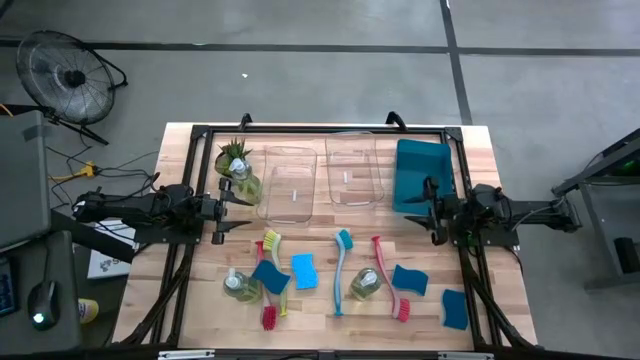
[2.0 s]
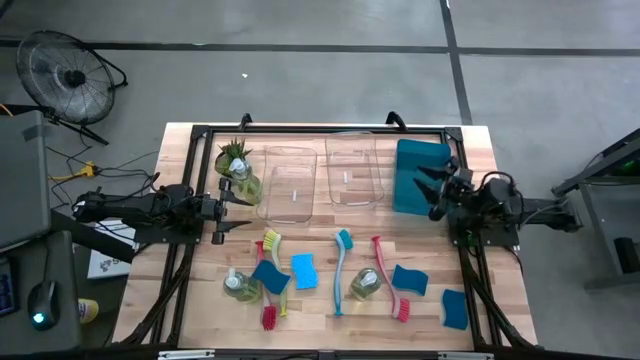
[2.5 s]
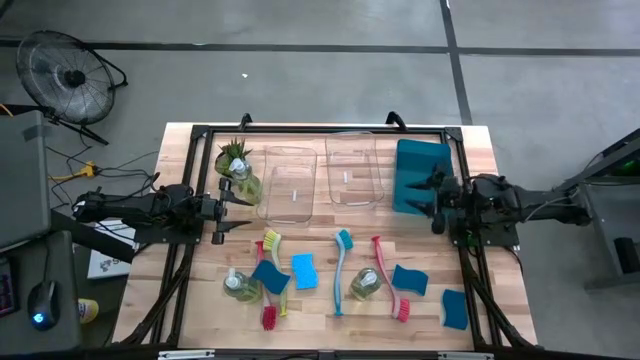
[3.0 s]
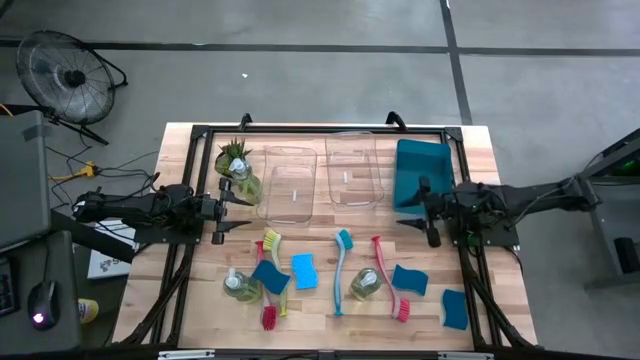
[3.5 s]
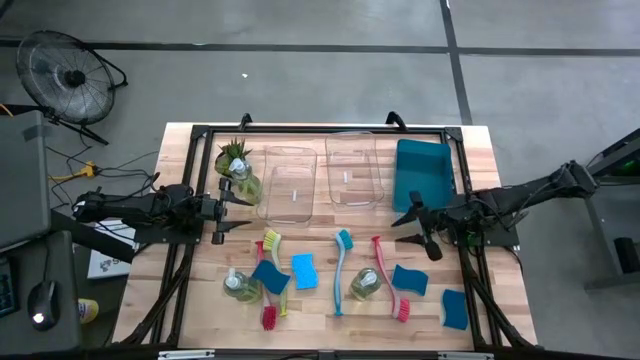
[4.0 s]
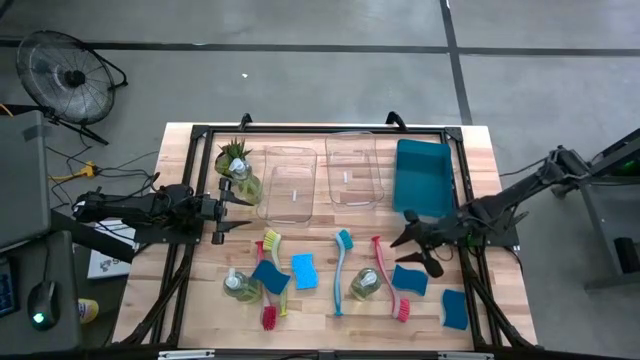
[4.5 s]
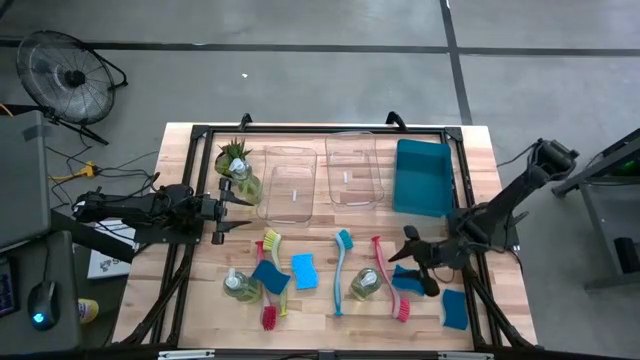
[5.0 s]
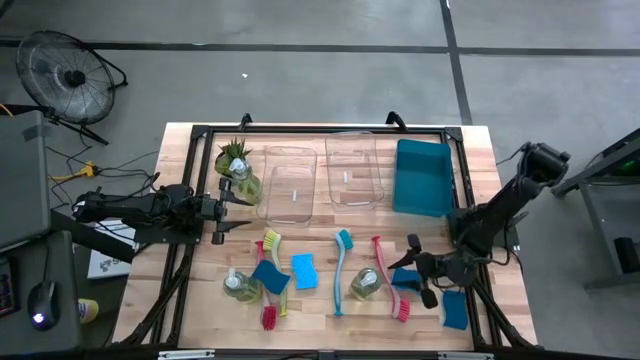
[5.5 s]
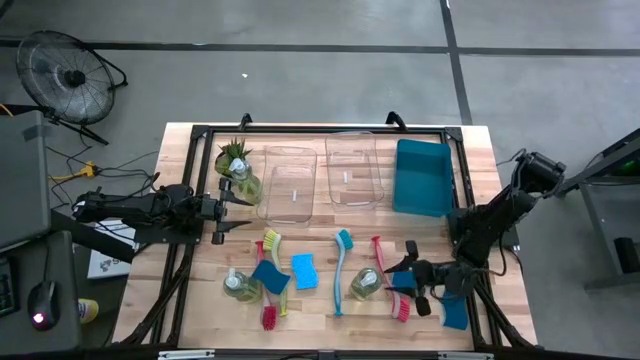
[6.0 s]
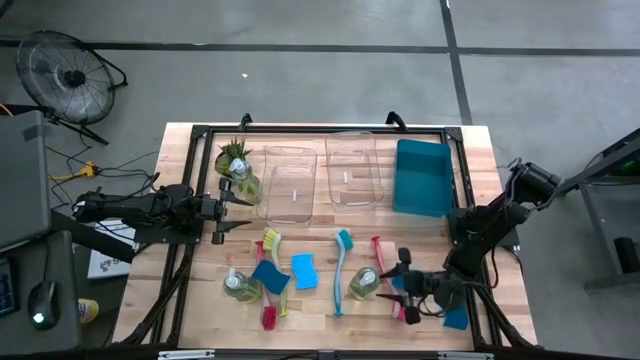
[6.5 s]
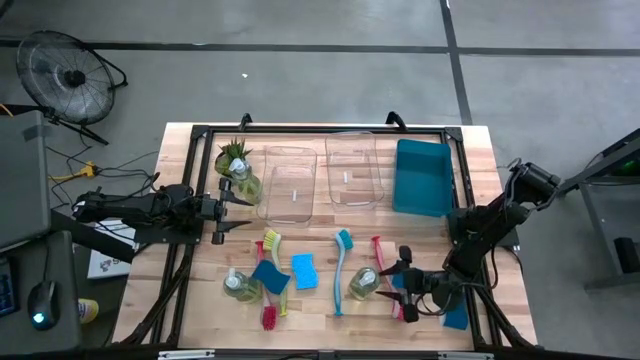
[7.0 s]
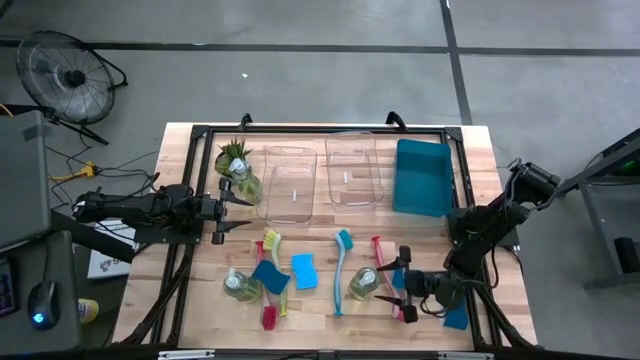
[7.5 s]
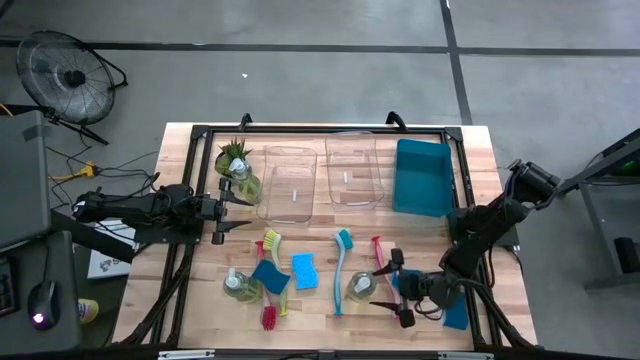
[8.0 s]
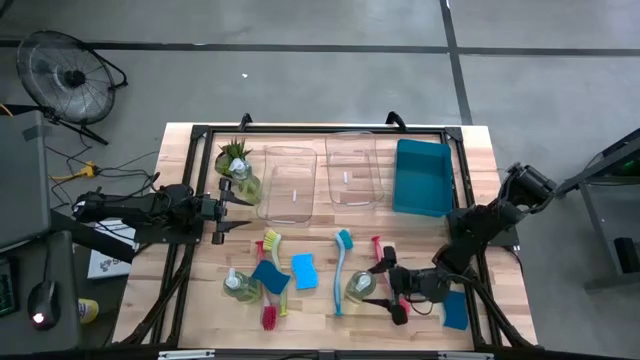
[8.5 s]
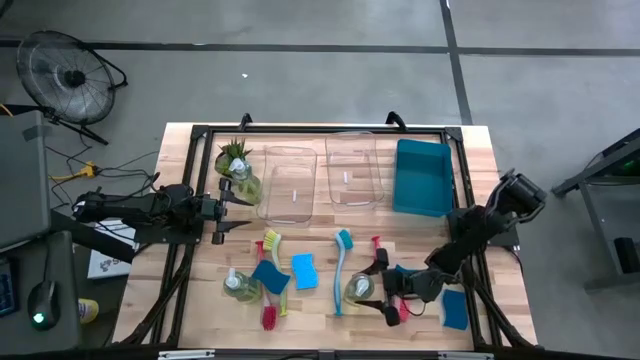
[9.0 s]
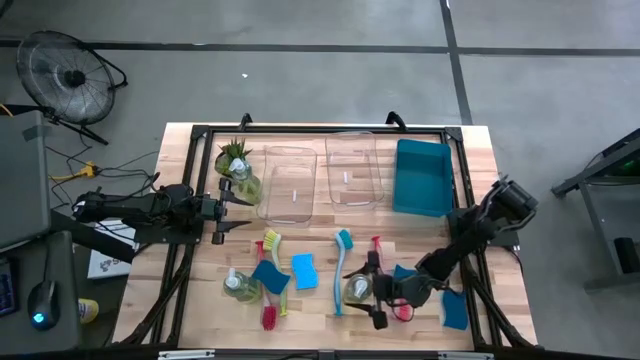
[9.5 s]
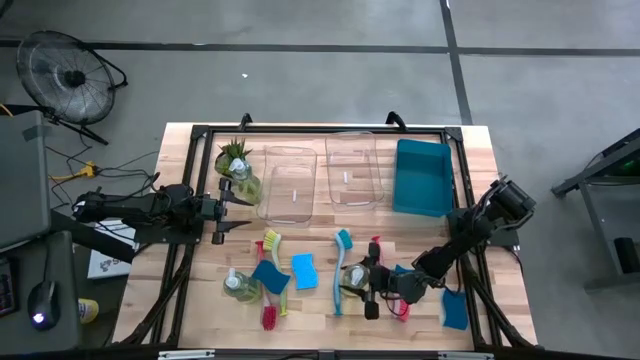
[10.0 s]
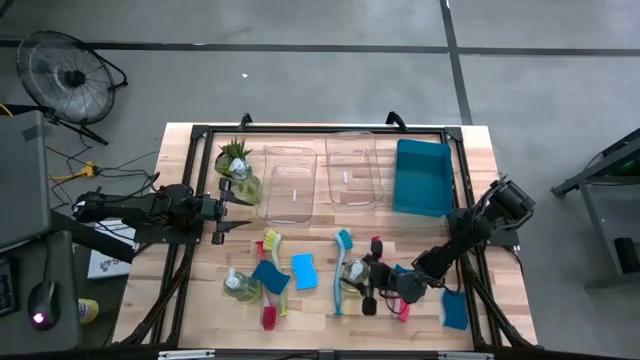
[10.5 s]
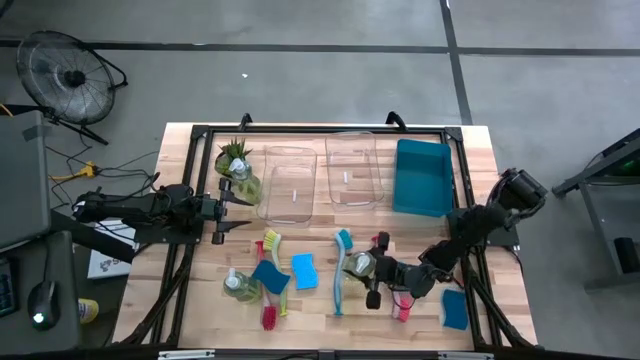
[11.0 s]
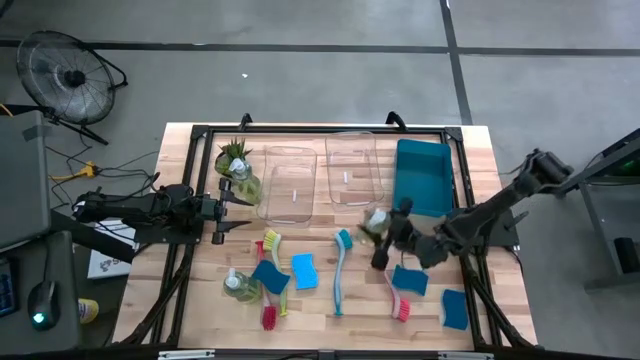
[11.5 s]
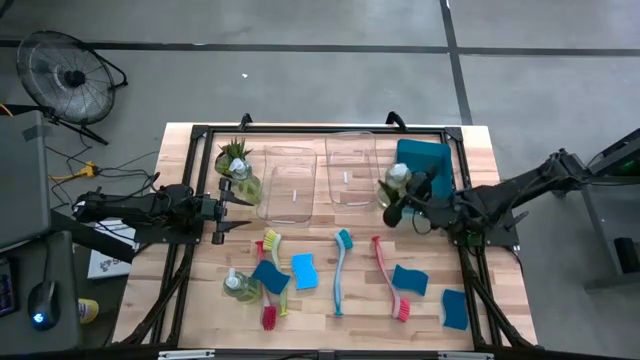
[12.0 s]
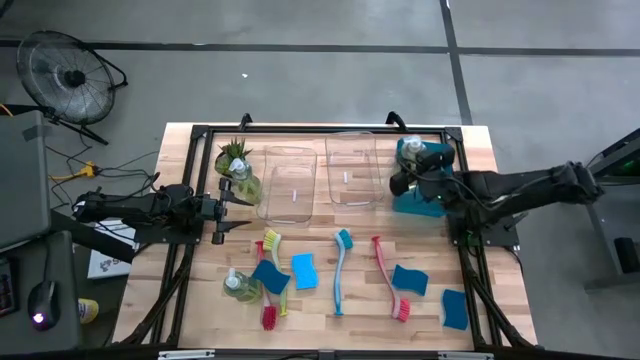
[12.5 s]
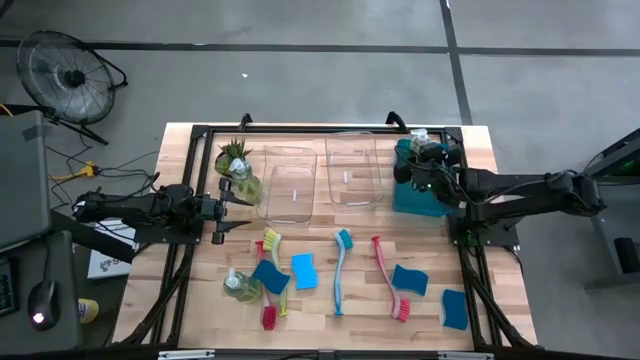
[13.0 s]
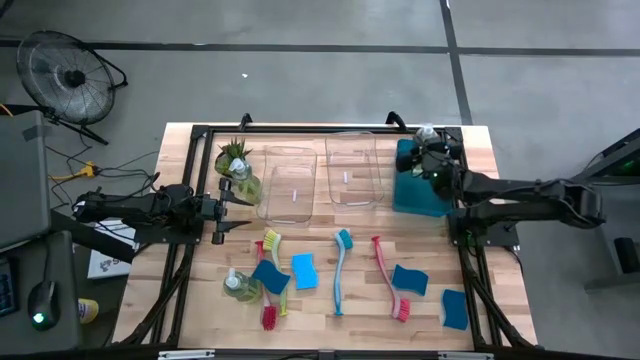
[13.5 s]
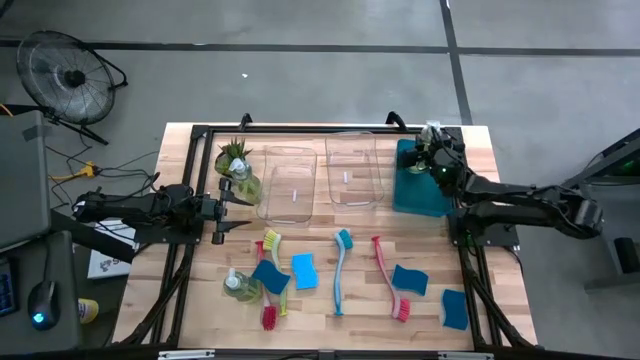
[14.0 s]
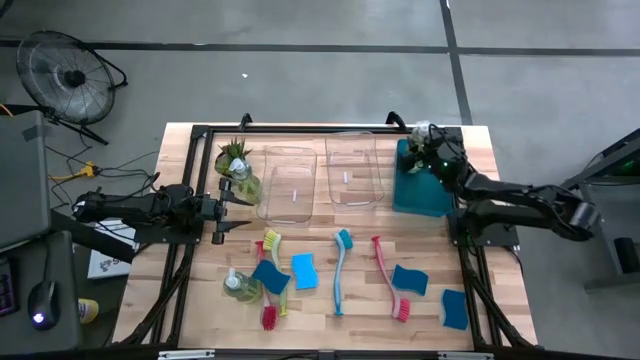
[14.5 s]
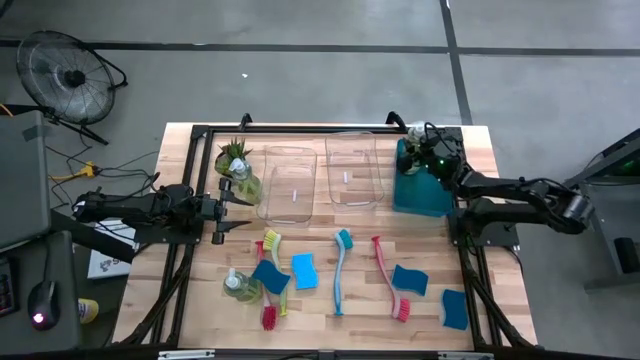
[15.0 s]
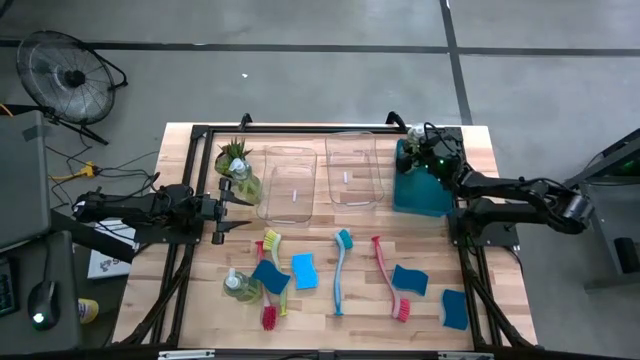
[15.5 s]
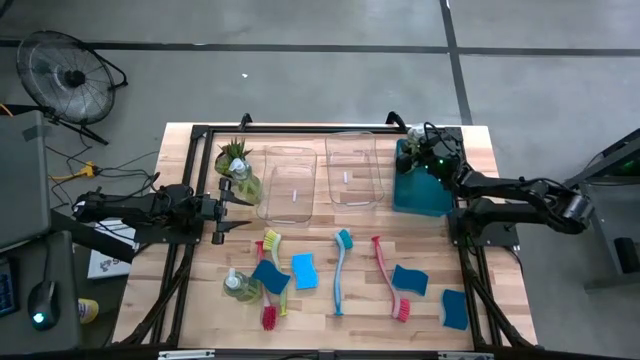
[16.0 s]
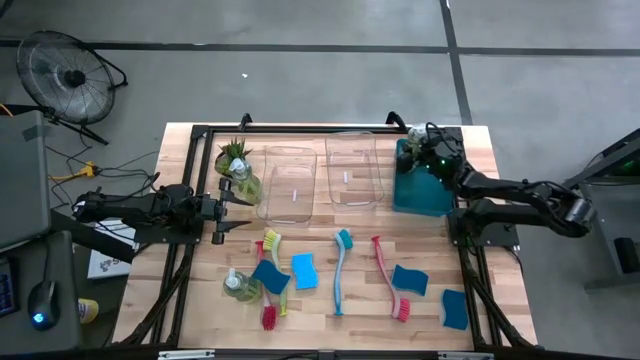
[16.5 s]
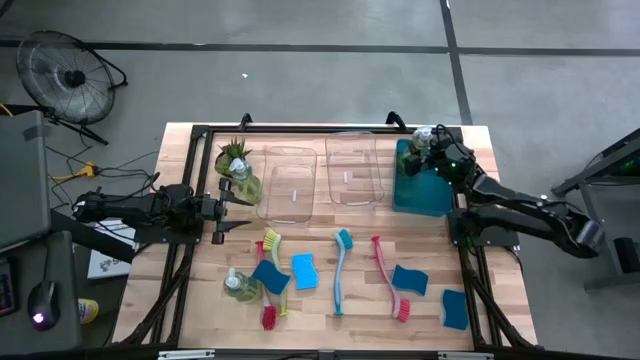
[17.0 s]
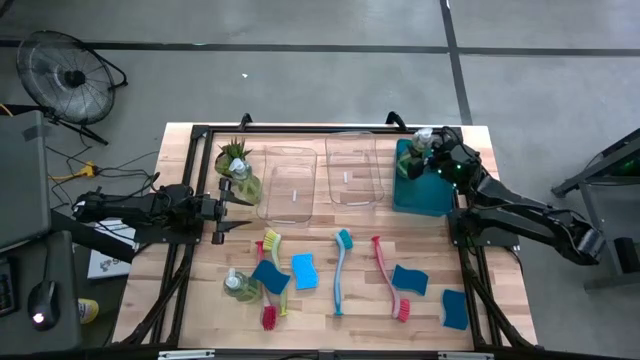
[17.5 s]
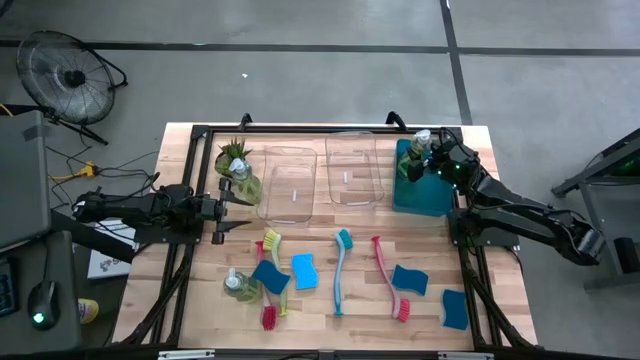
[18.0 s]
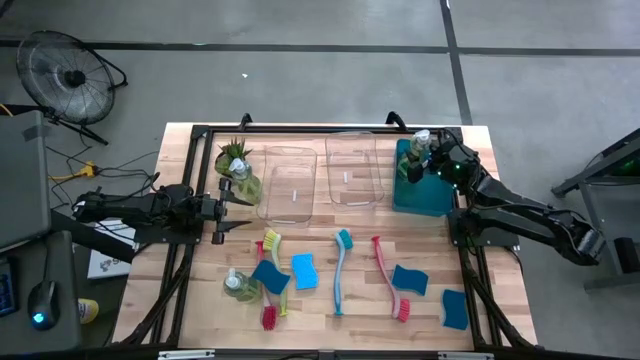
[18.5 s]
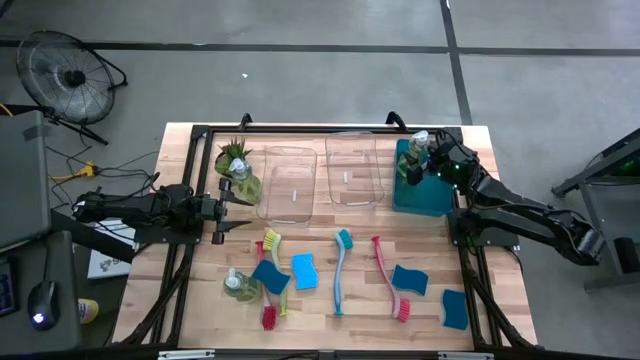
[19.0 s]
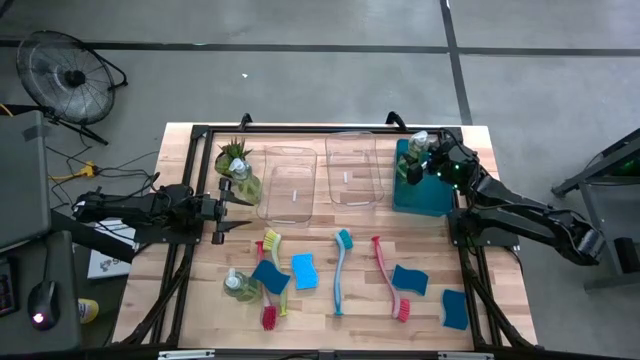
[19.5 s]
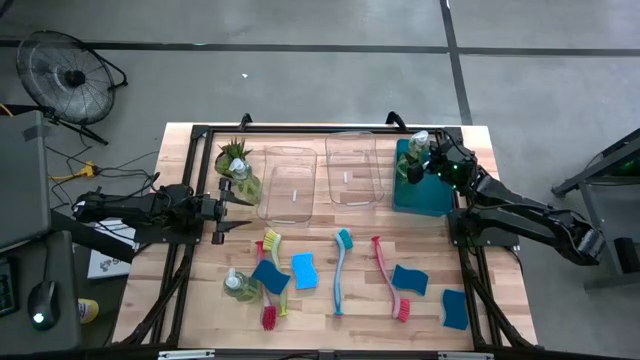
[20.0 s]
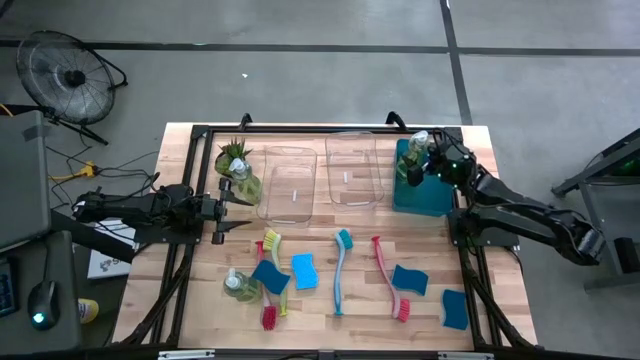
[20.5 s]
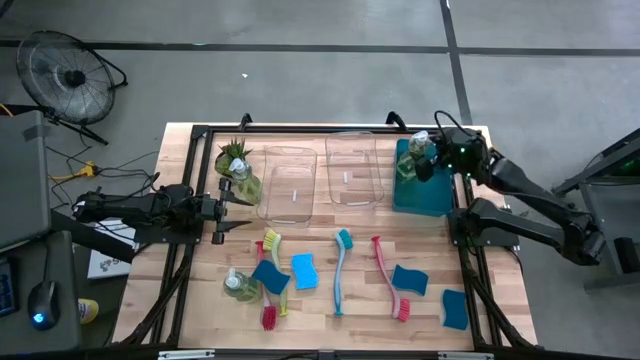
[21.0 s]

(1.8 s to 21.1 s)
Task: Pick & Place Kitchen Sink Supplies
Put the bottom right green dishwashing liquid dispenser into the blue bin
